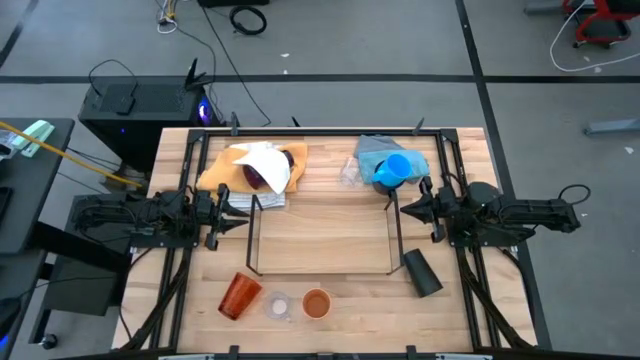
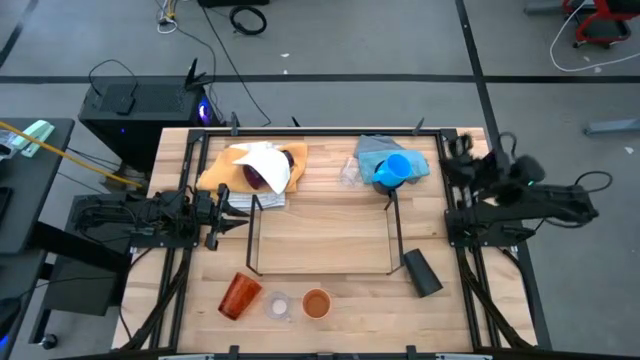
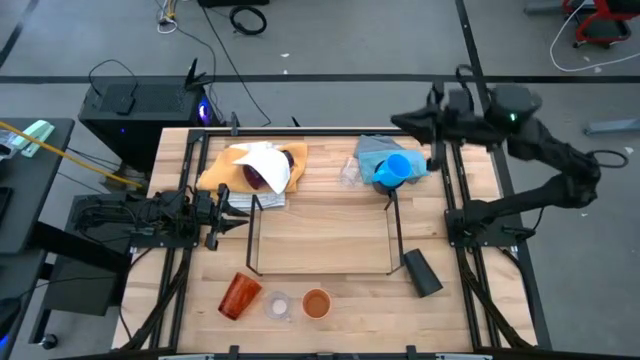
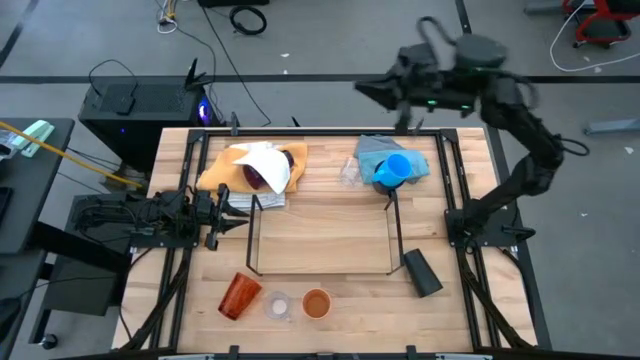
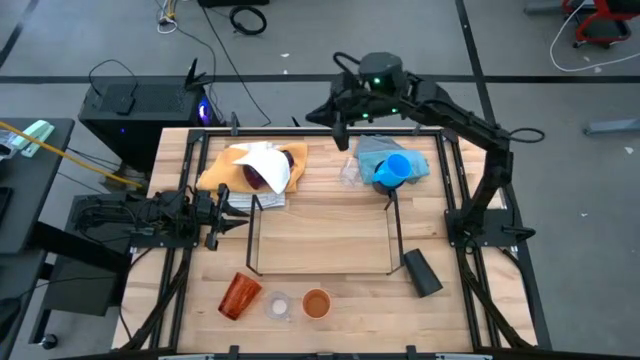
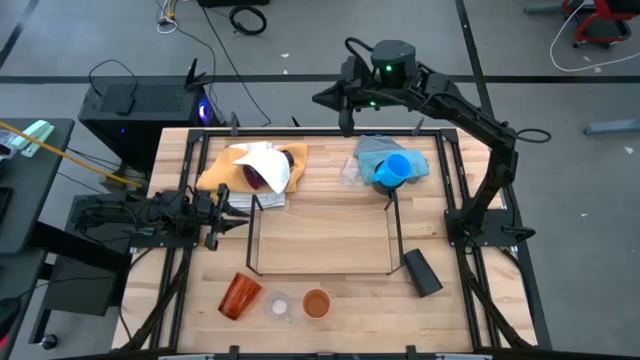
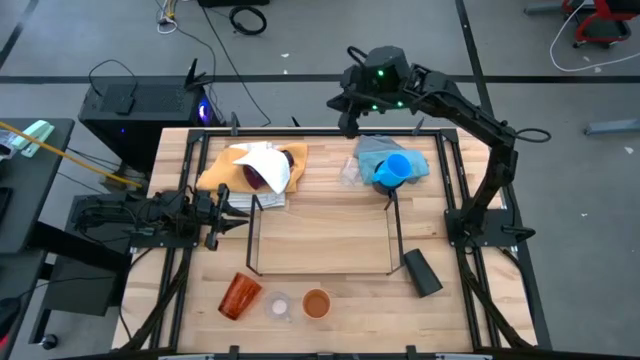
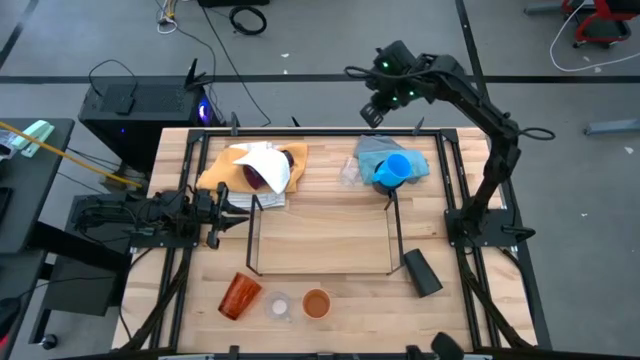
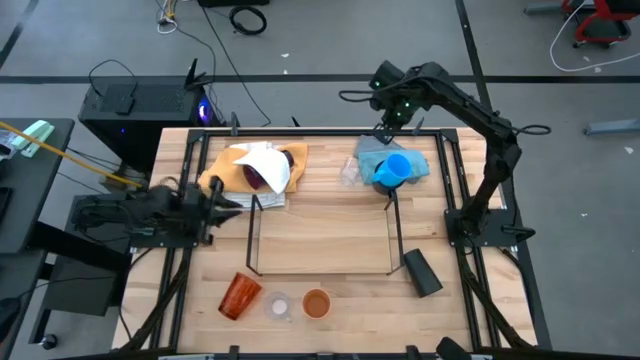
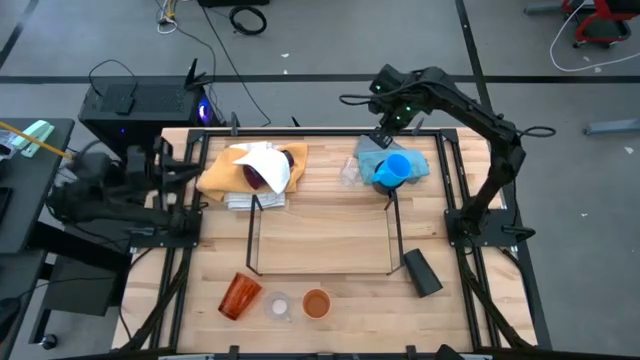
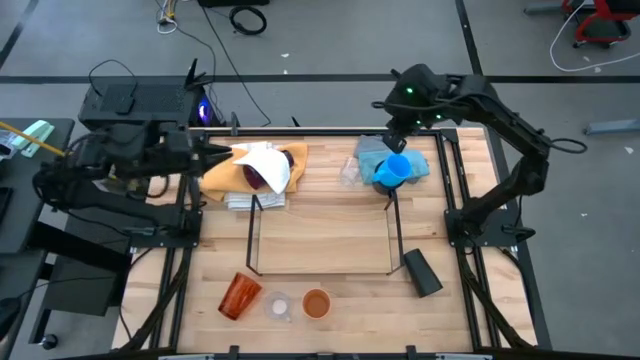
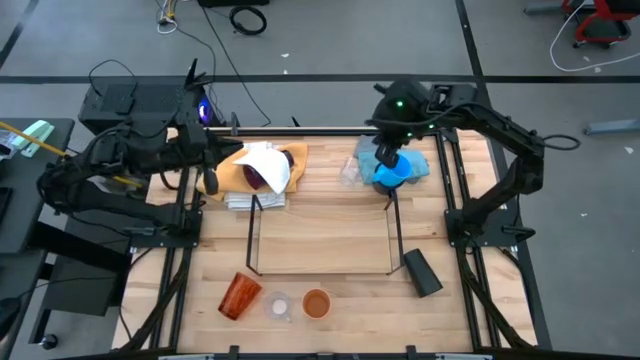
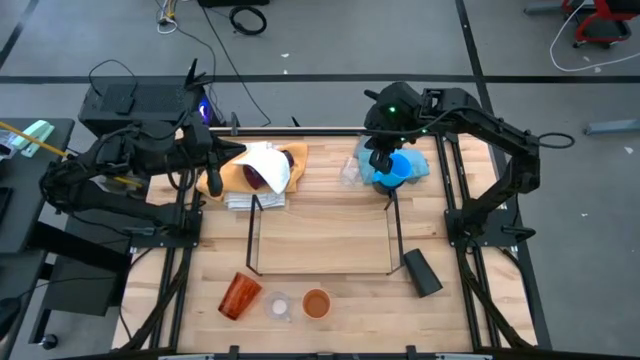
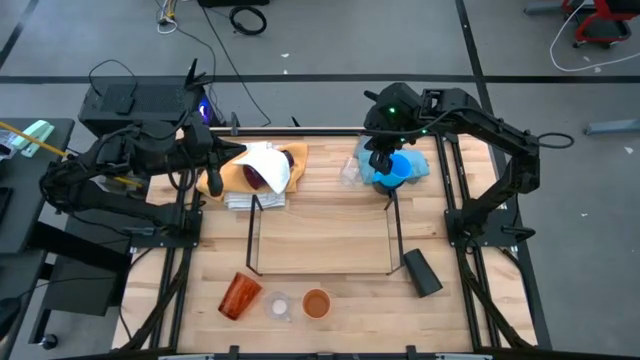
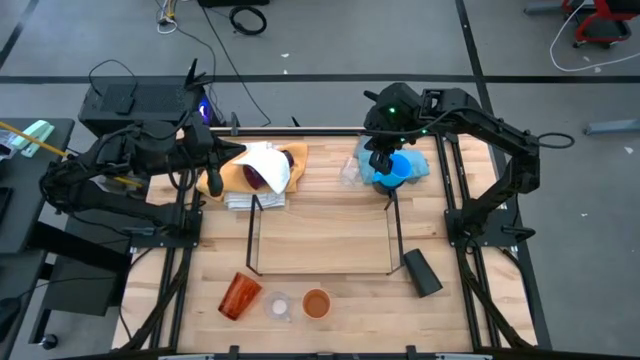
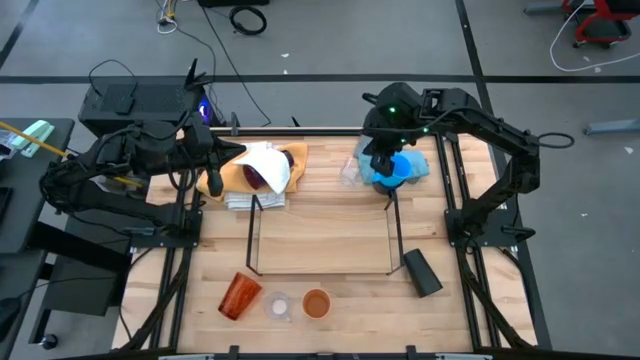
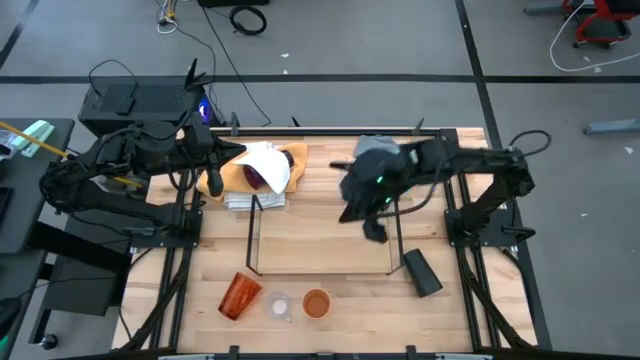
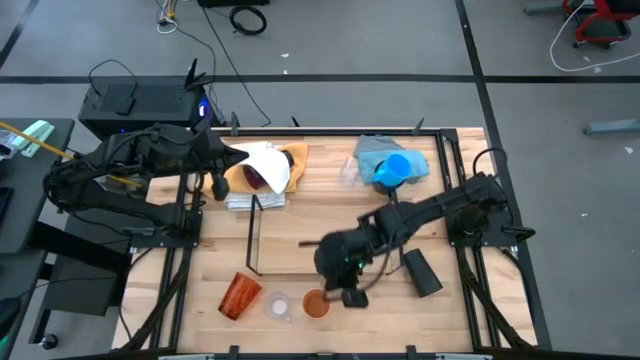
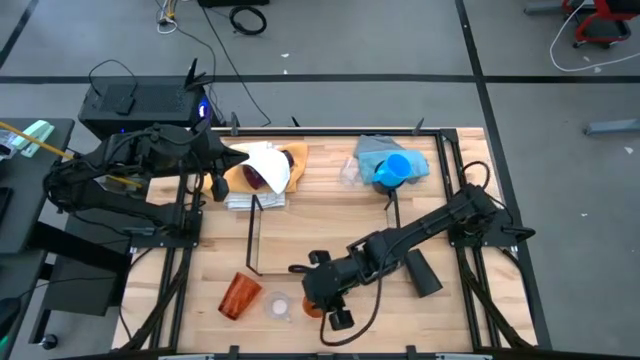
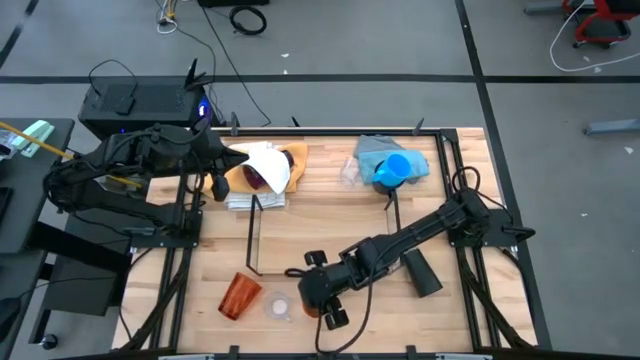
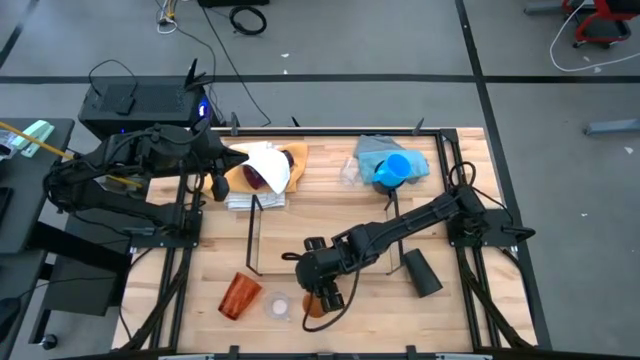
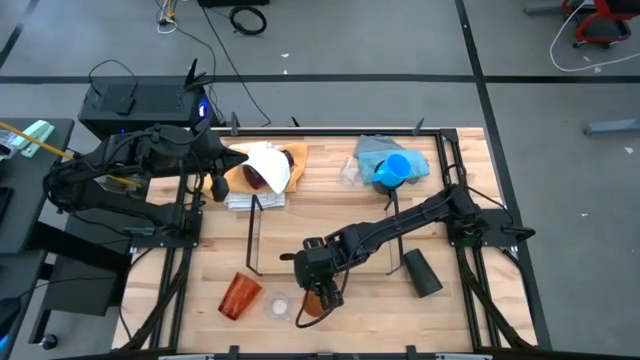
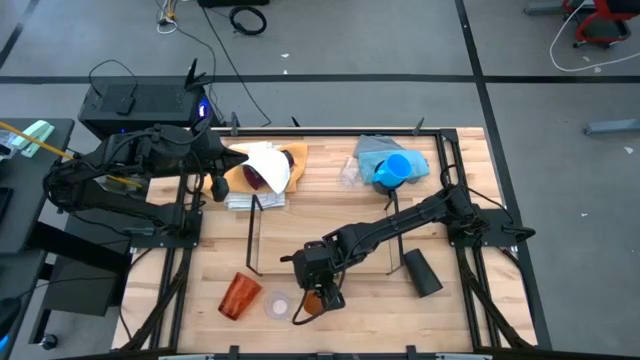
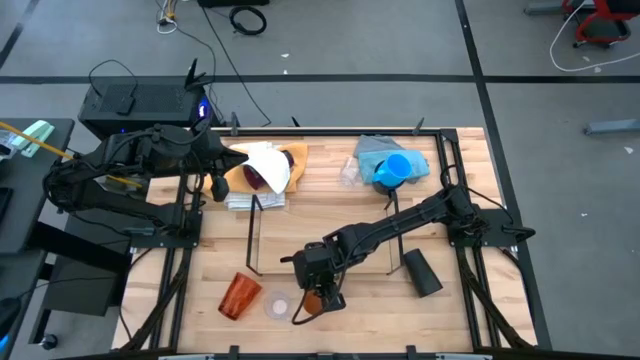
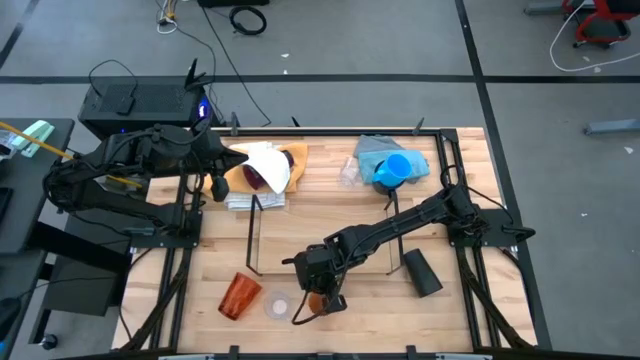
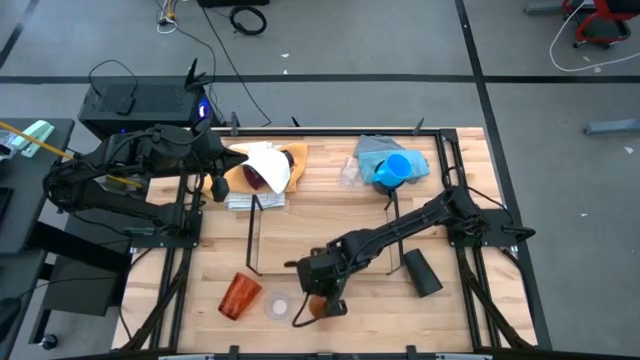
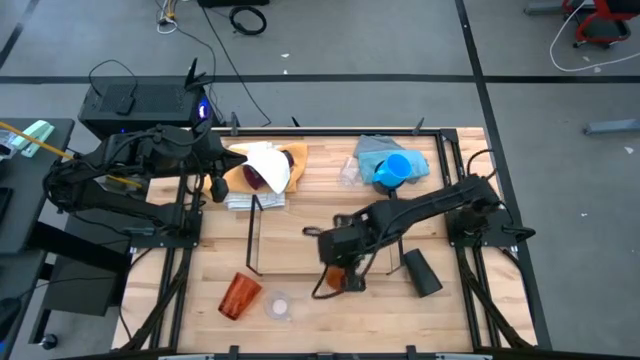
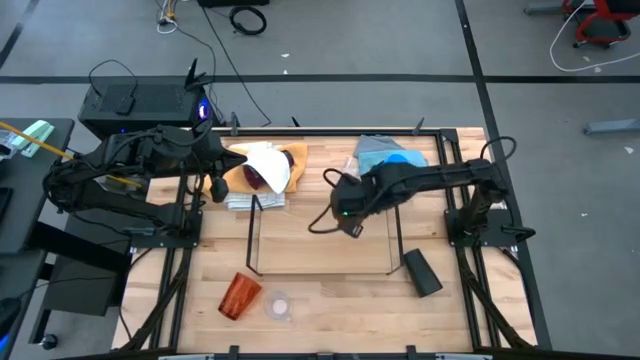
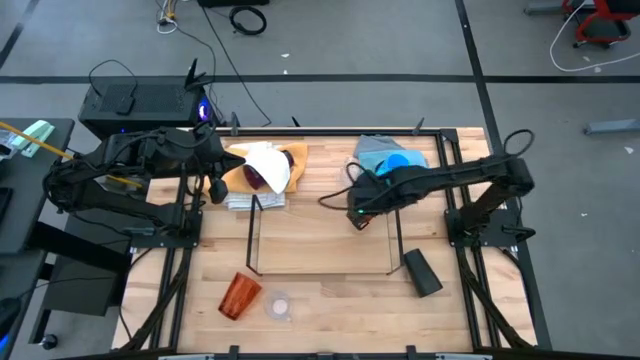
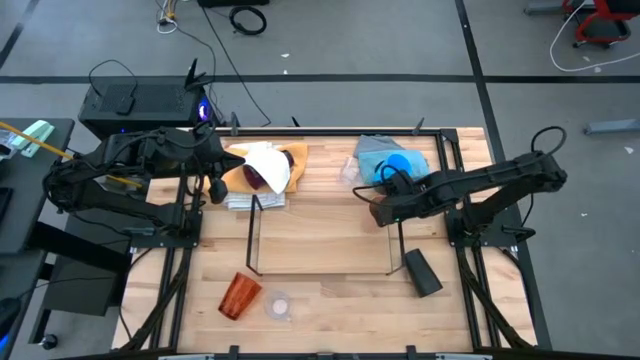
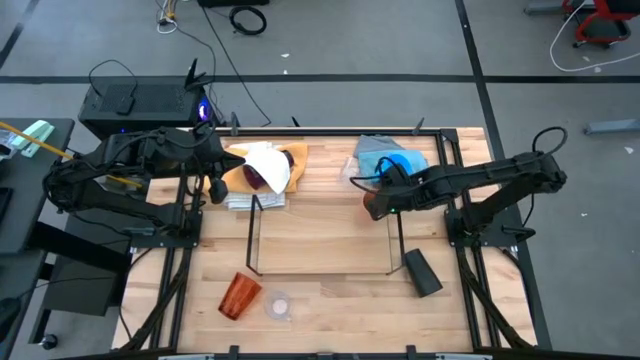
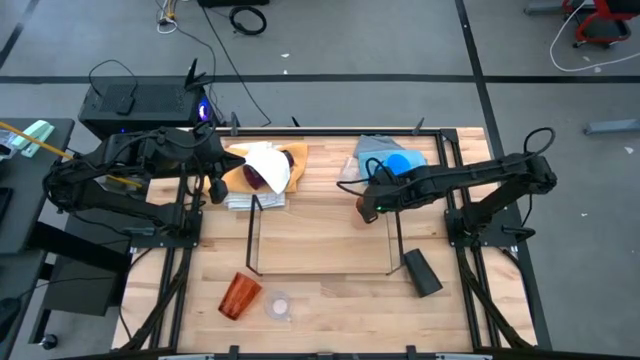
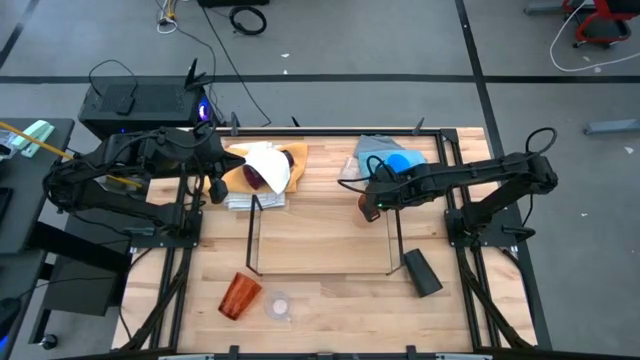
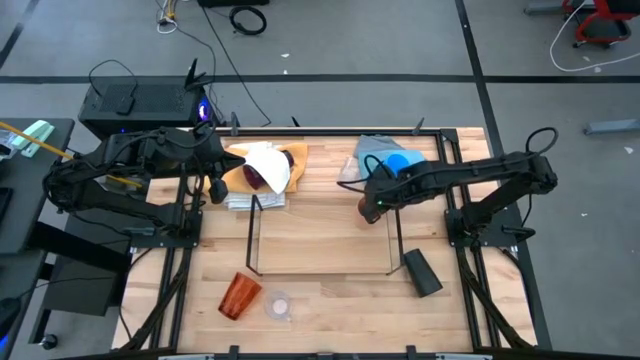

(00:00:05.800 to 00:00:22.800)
Task: Stack small to large cups/mugs on shelf
Put the light orange cup on the shelf

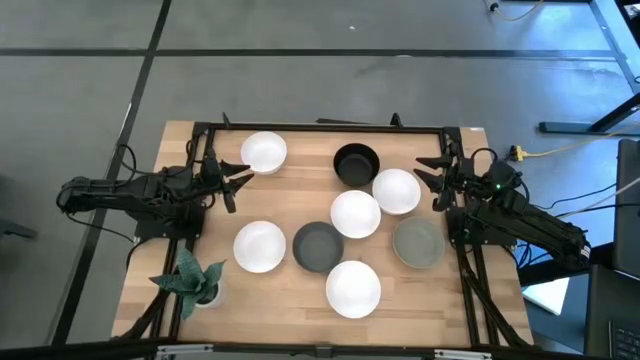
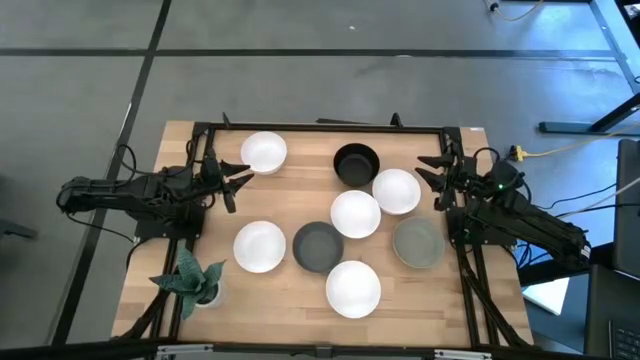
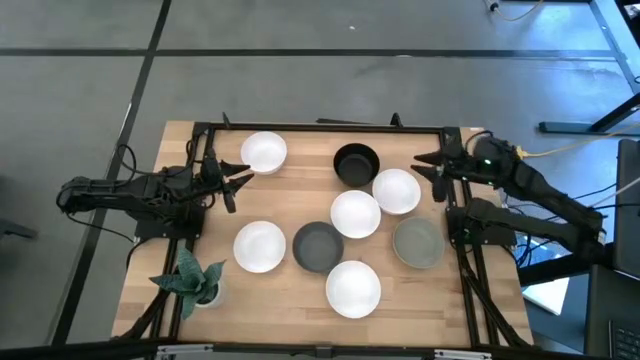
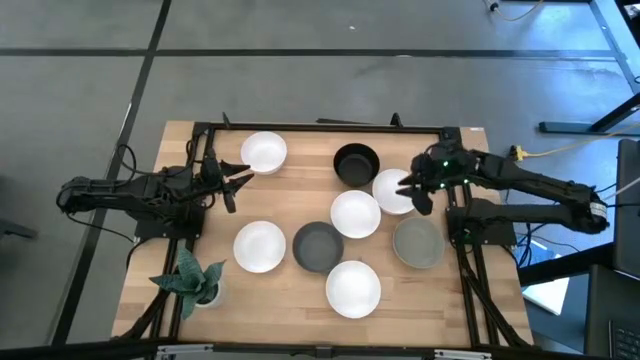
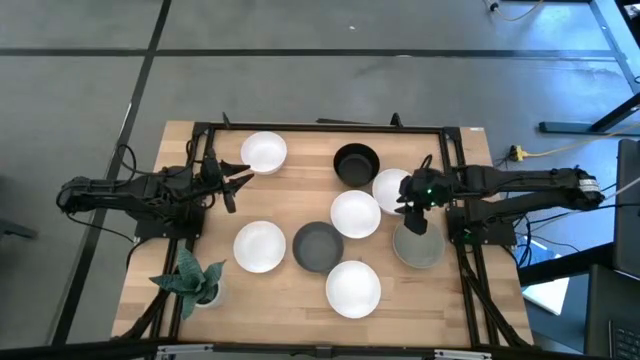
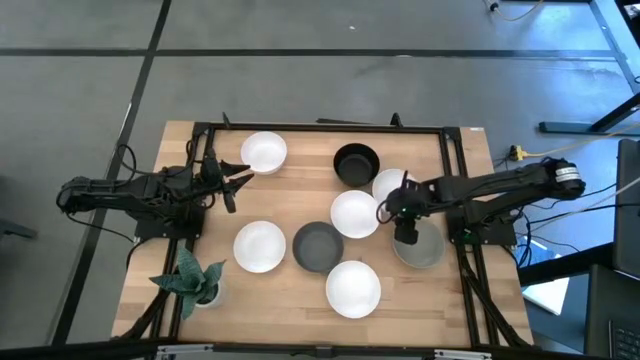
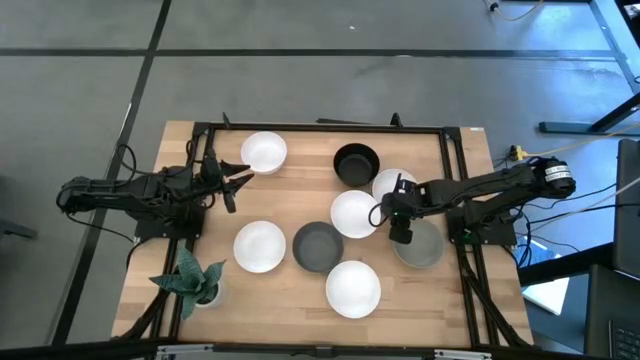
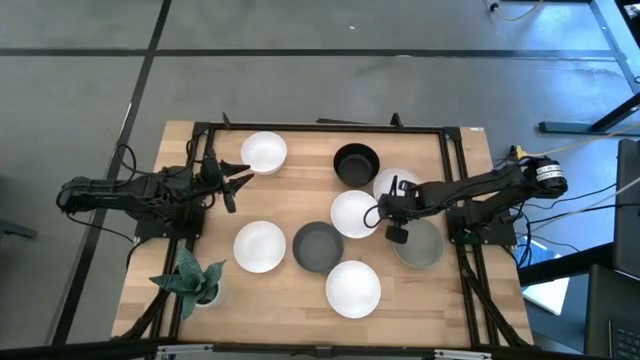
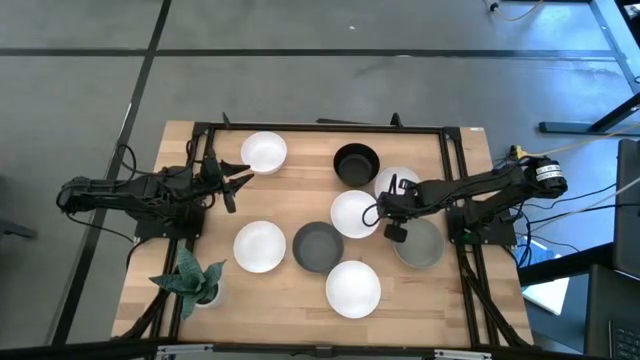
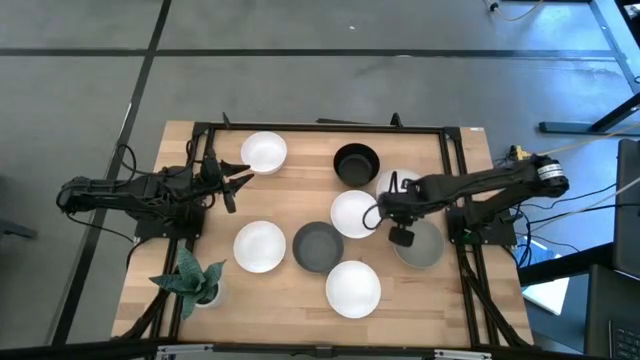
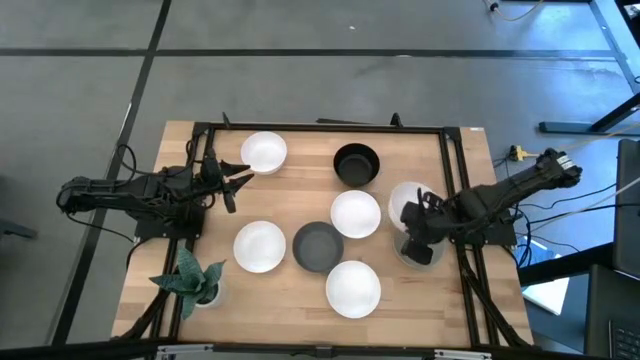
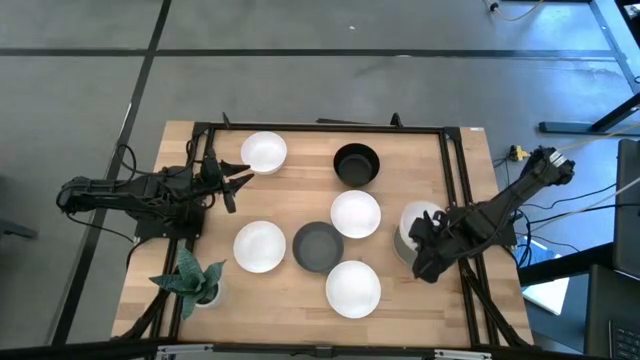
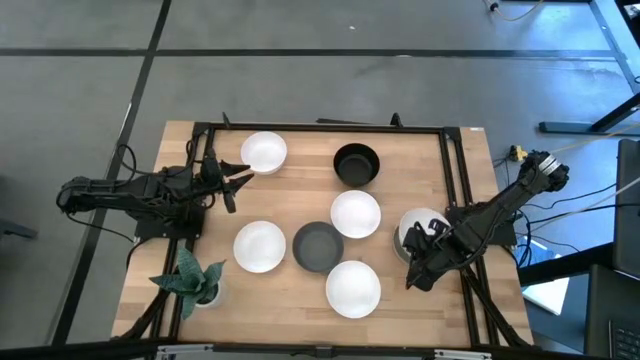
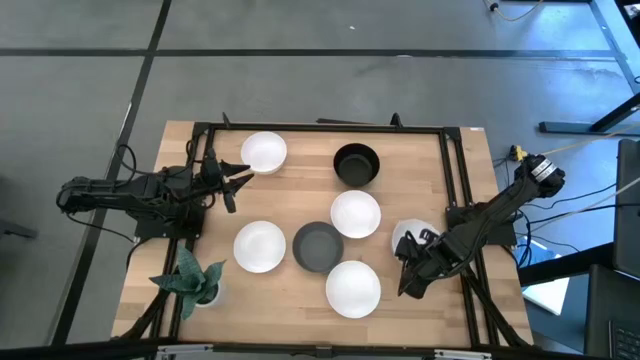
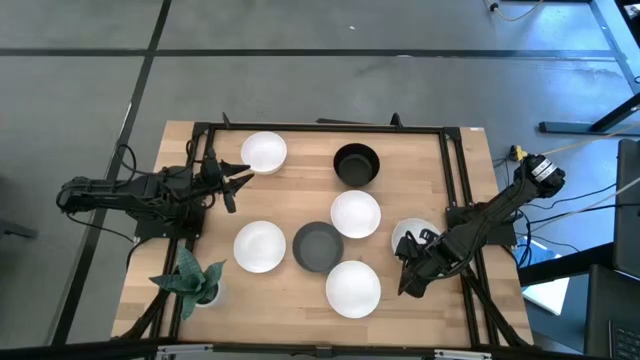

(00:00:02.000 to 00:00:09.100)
Task: Nest bowls inside each other
Stack the white bowl on the light gray bowl
